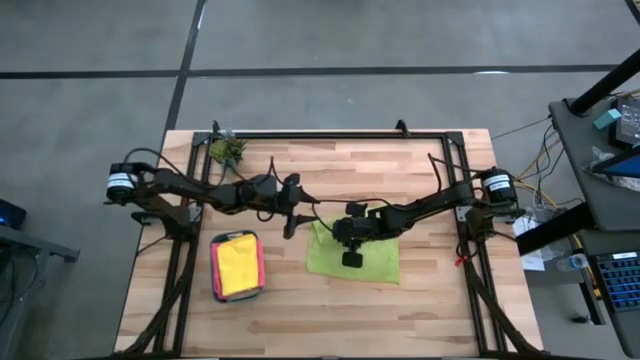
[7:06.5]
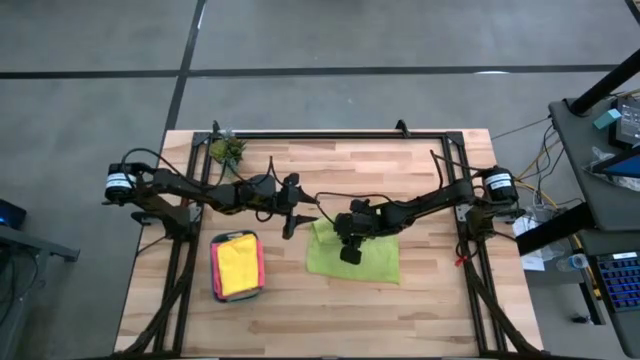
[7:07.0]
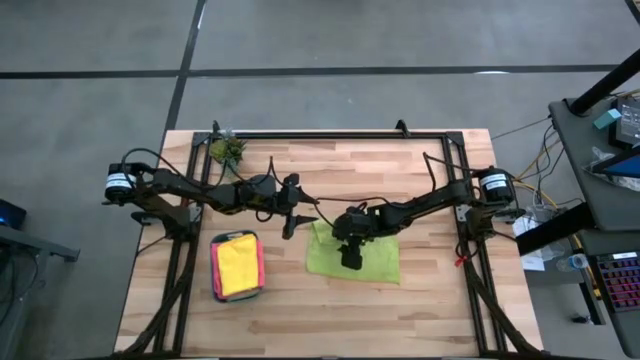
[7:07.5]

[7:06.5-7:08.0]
Task: Fold microfiber towels
Fold the green microfiber cloth

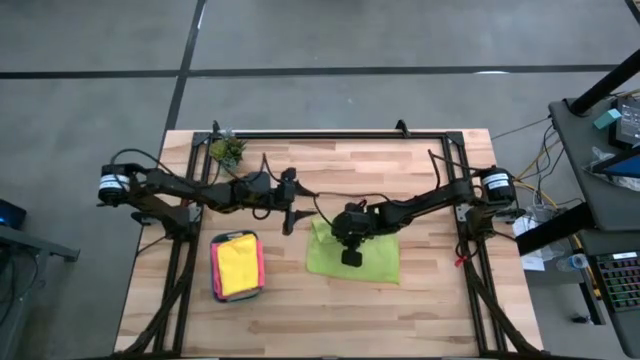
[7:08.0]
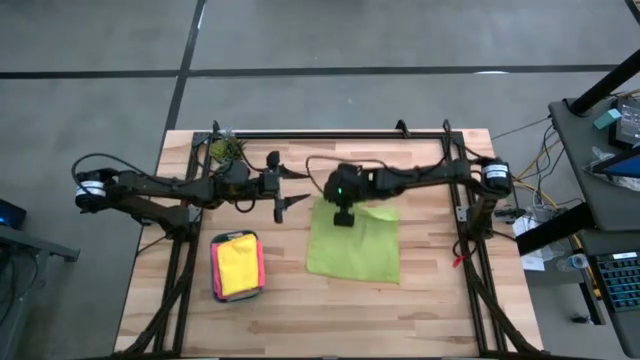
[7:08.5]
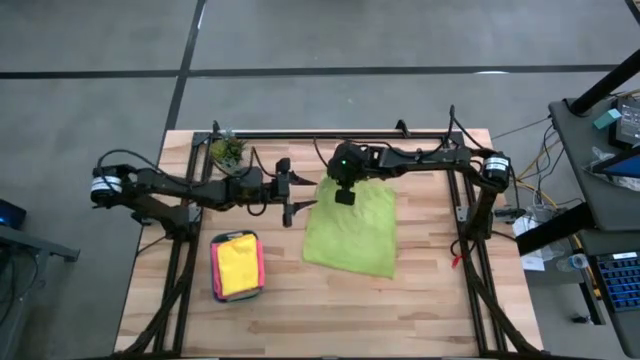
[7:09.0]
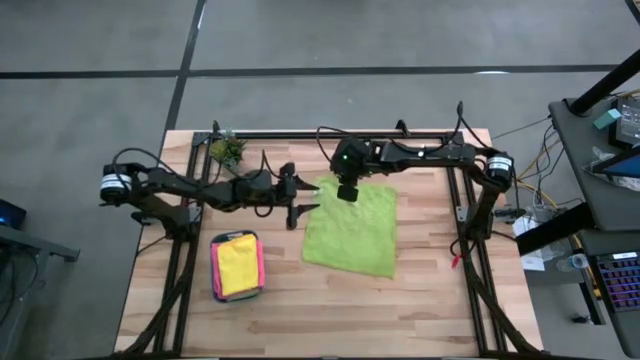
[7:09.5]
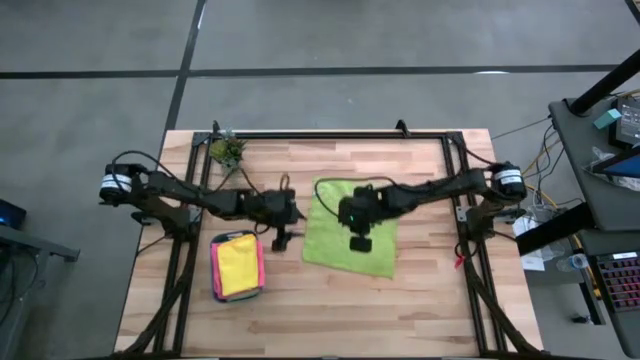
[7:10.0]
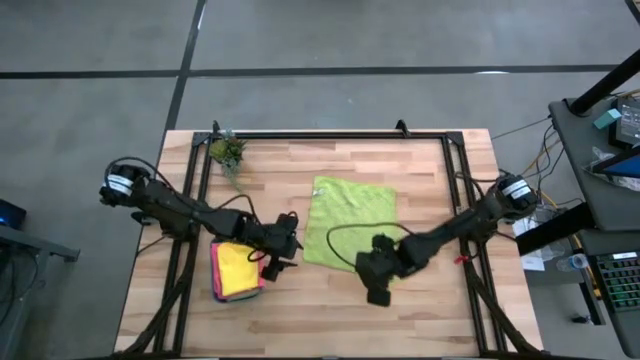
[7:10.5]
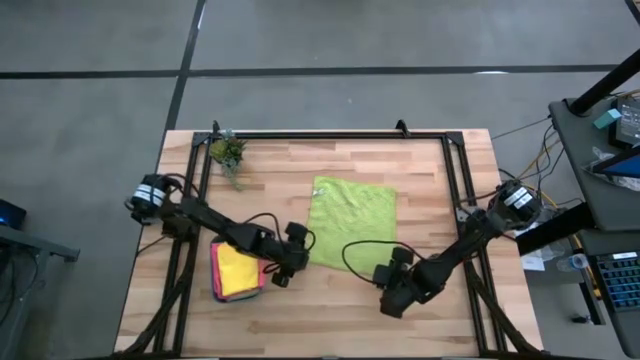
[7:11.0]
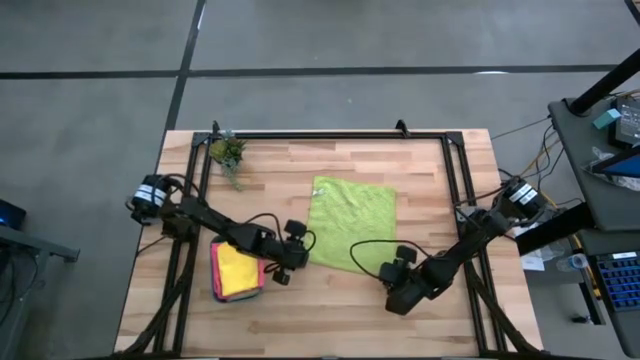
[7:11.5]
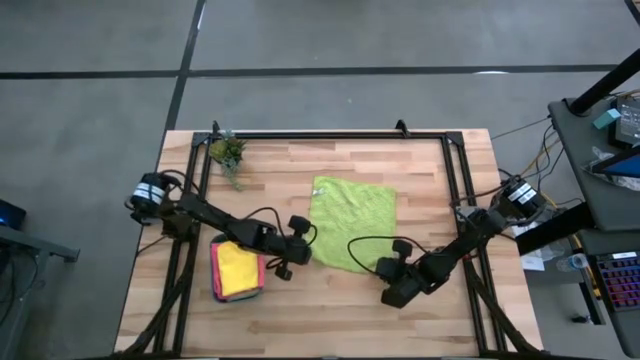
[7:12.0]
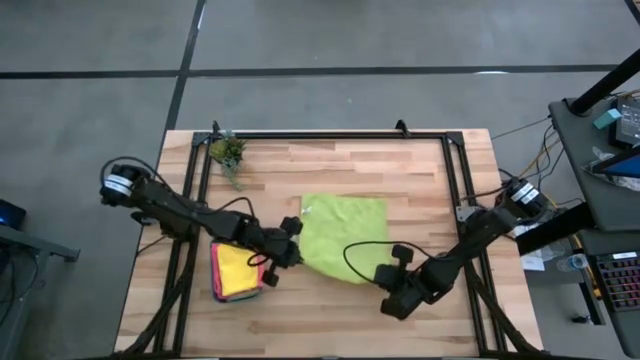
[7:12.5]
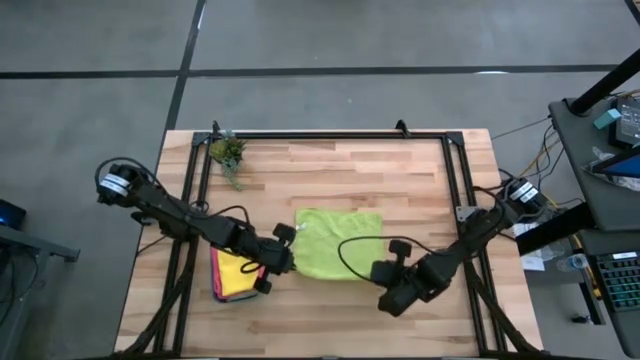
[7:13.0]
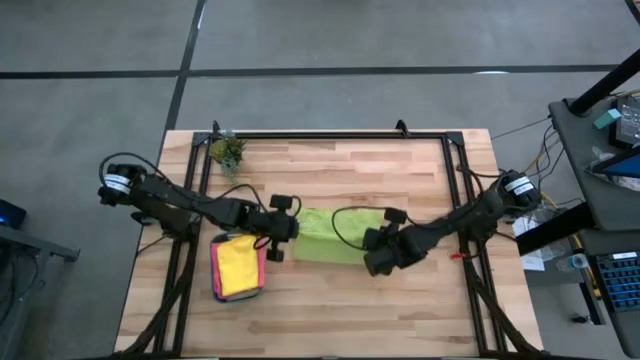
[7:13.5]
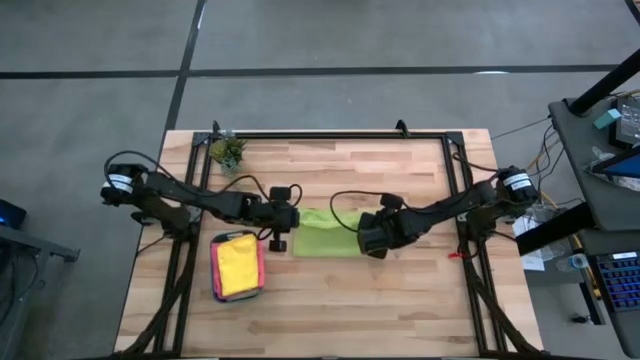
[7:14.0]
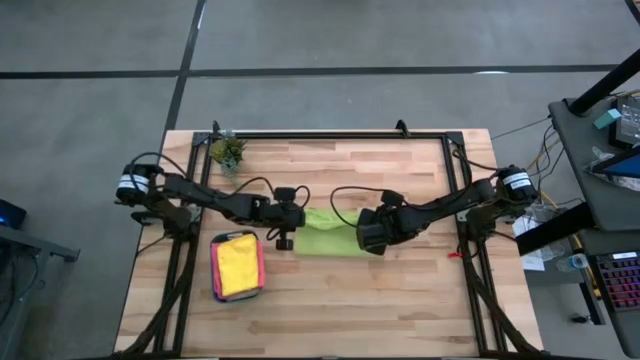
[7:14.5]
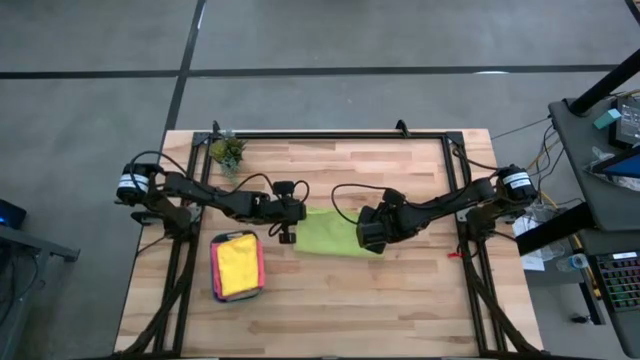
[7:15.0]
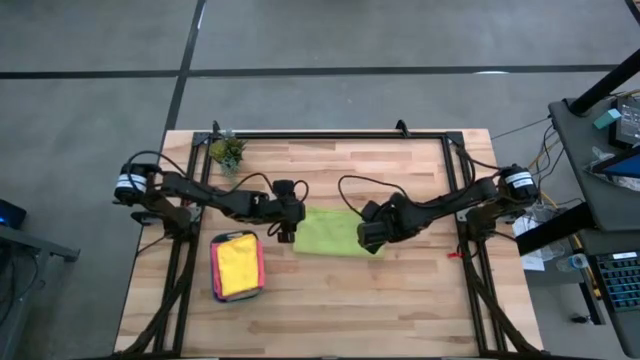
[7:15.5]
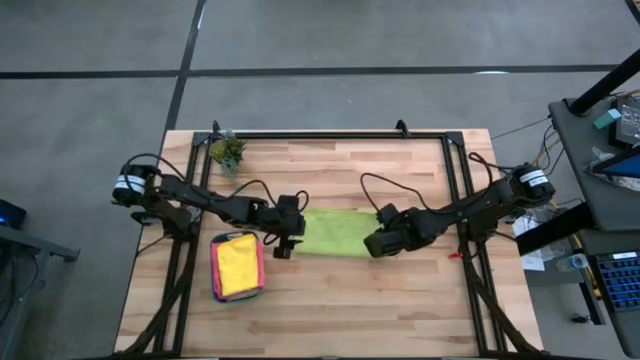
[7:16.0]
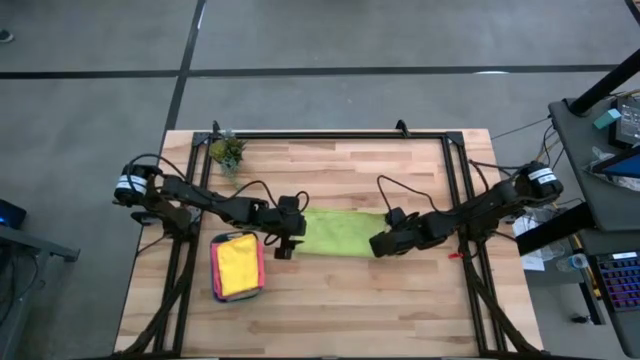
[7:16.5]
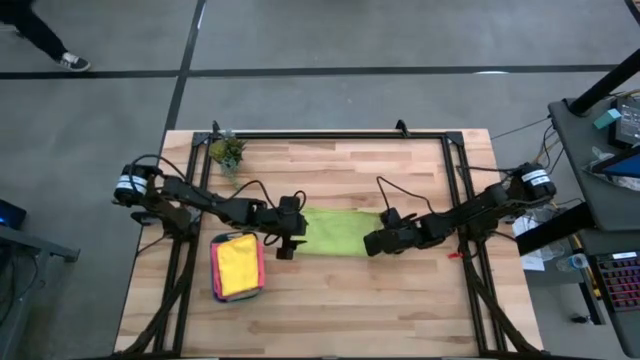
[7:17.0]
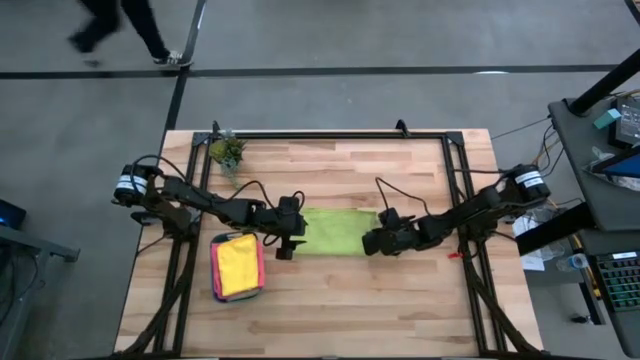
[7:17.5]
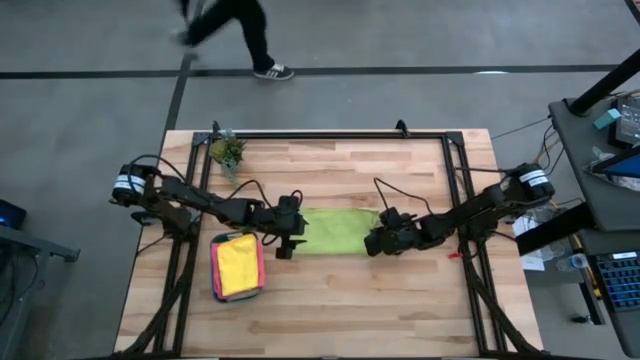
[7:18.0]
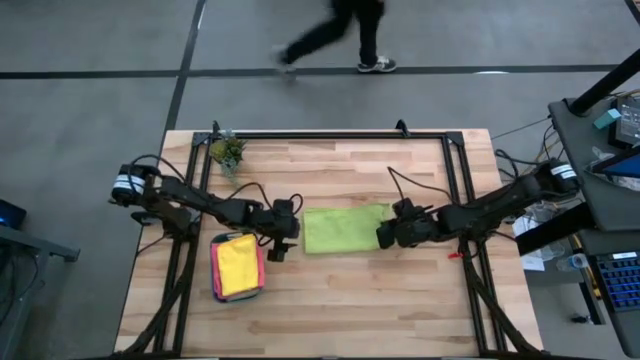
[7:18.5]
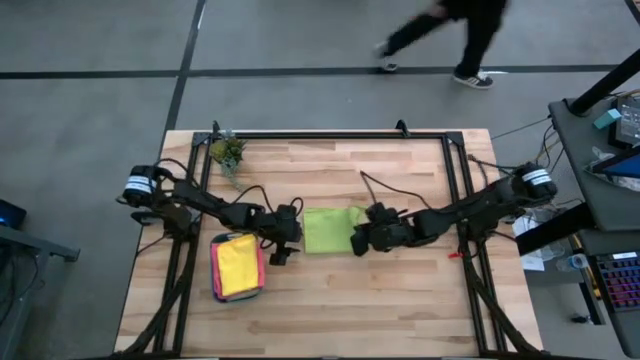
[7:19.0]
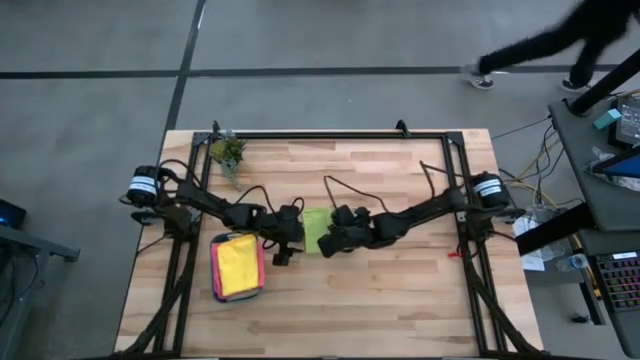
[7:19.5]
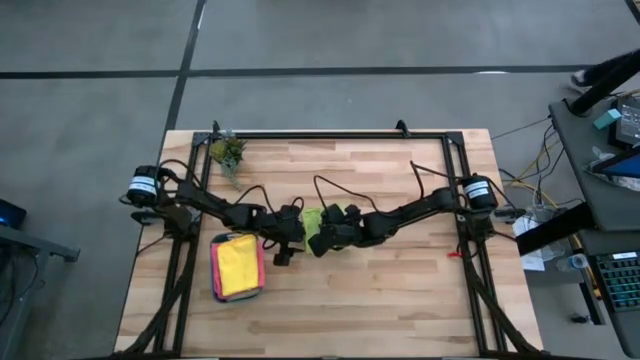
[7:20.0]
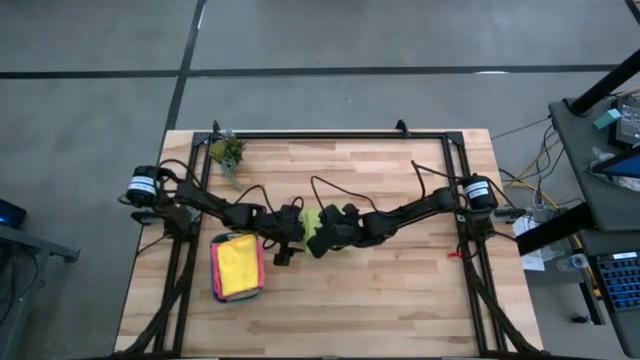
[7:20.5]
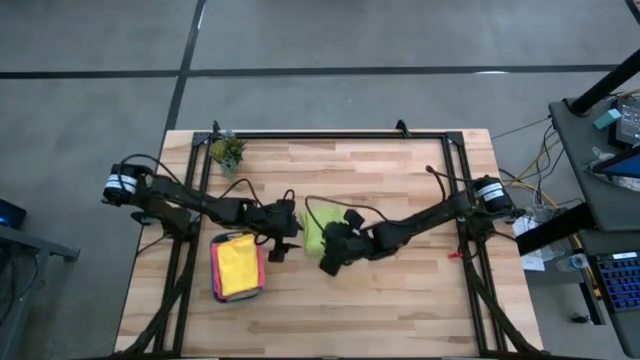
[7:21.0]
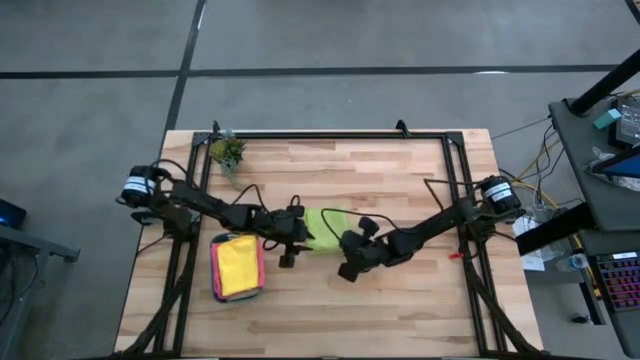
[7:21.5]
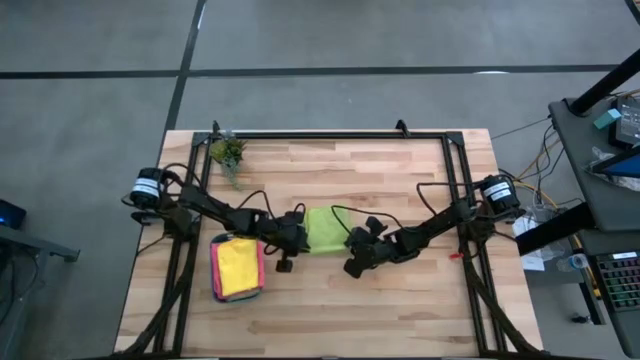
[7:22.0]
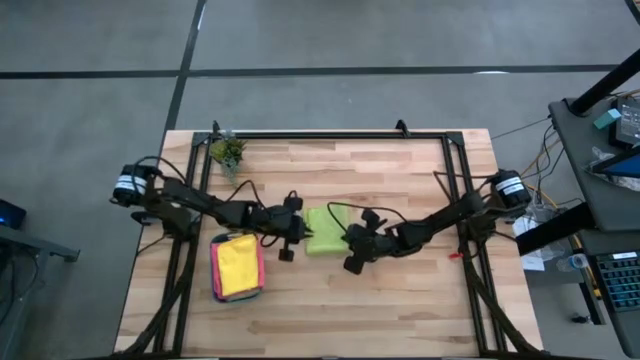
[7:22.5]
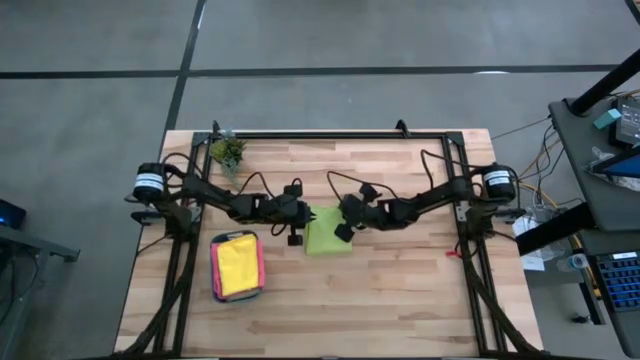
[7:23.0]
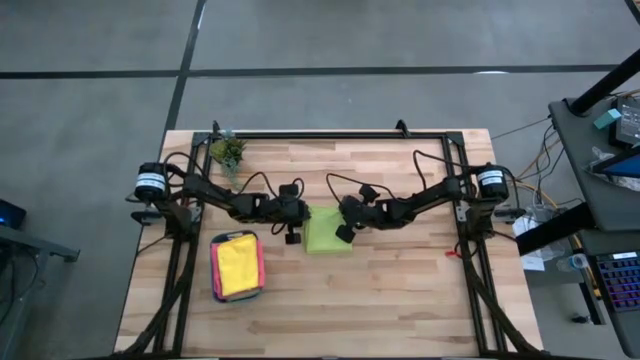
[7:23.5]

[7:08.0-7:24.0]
Fold the green microfiber cloth

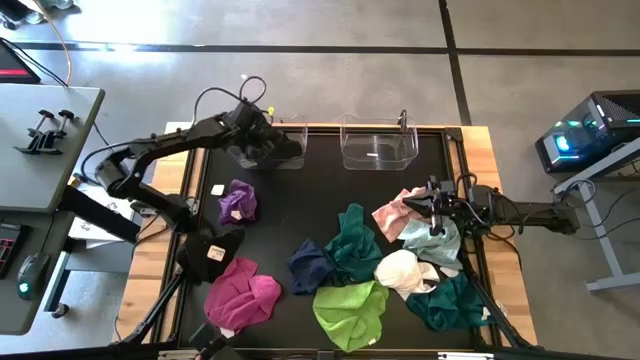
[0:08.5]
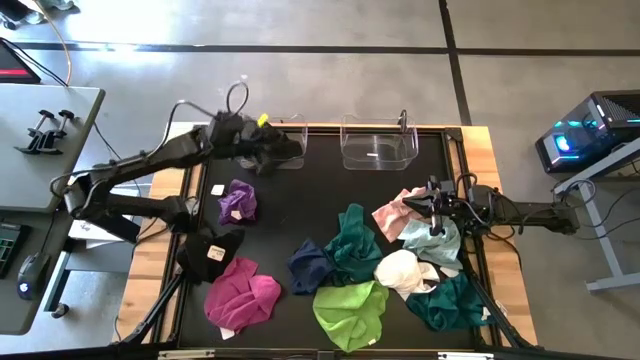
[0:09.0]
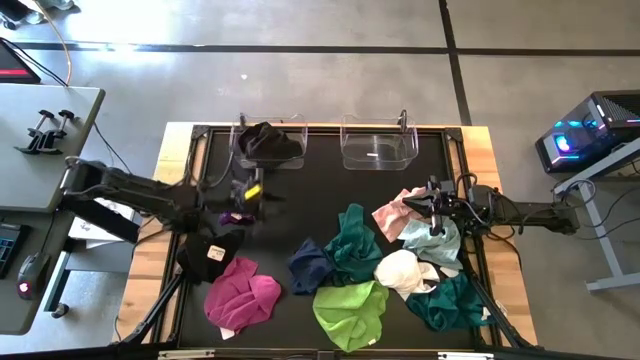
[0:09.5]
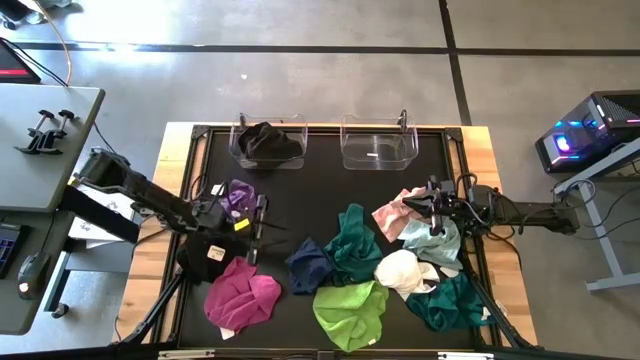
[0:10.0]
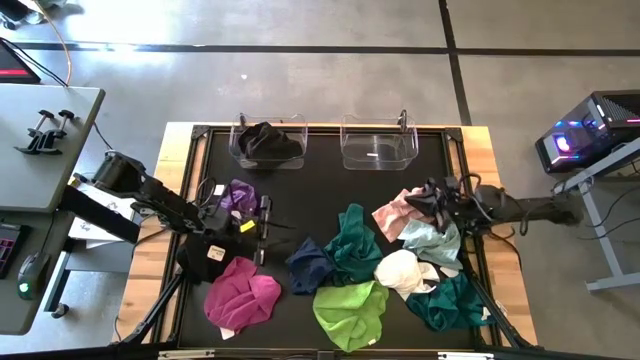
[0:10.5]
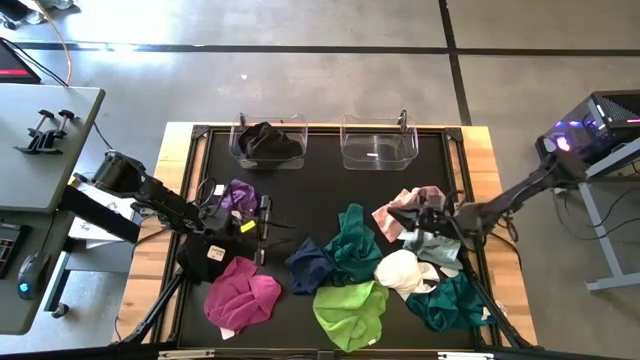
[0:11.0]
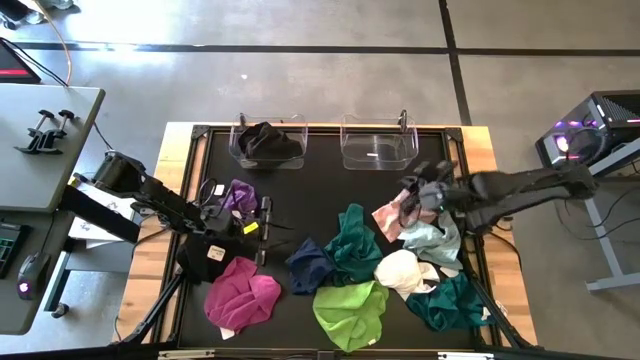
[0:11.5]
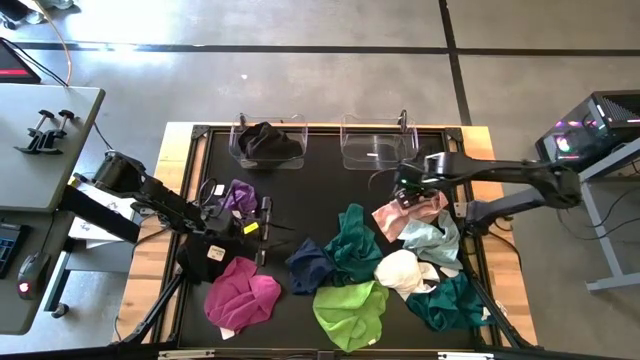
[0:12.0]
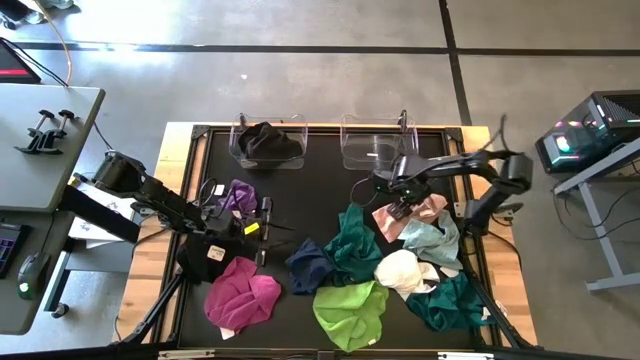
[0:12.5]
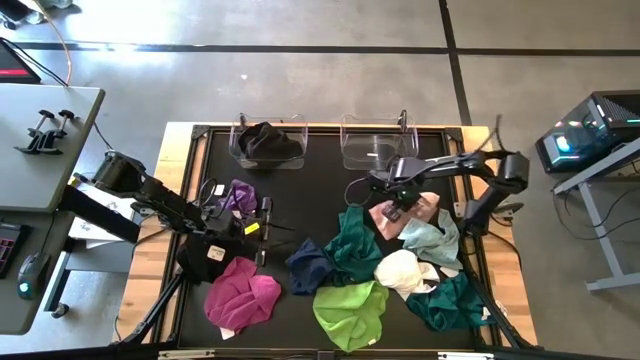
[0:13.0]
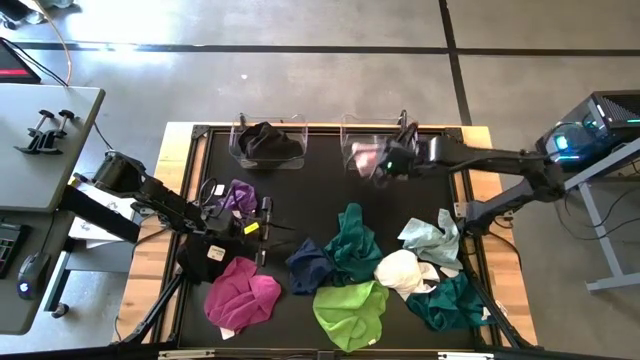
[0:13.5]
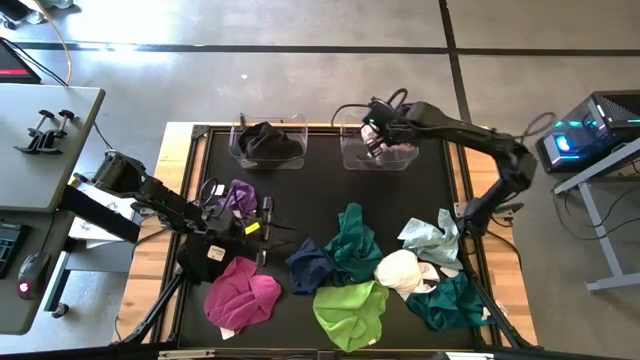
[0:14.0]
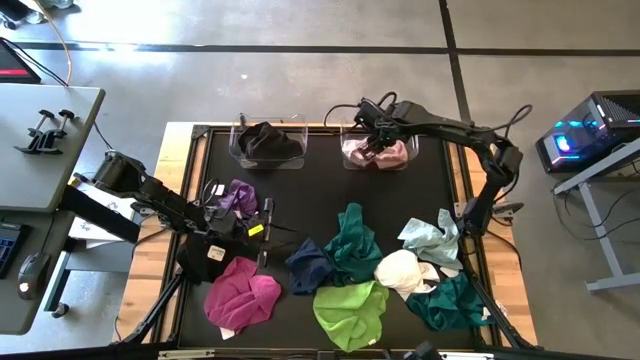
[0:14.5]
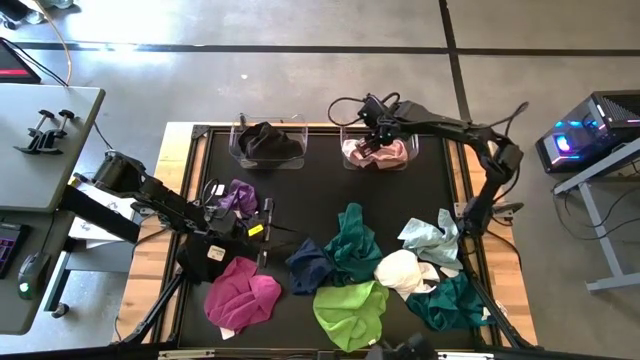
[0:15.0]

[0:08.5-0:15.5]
Task: Sort towels by color in basket
Put the light pink microfiber towel into the right transparent bin
